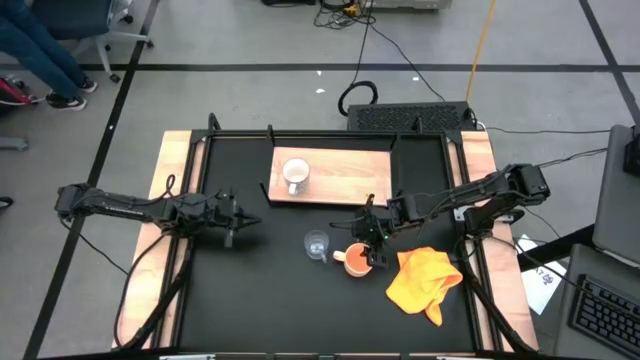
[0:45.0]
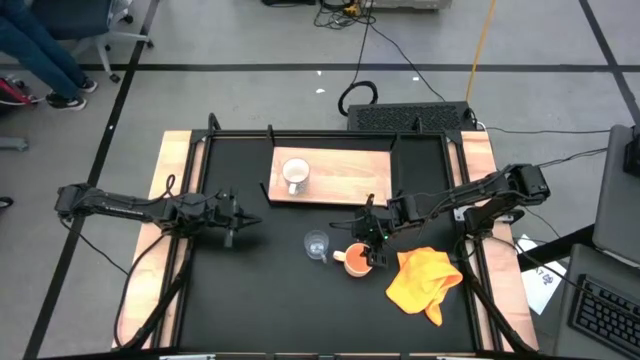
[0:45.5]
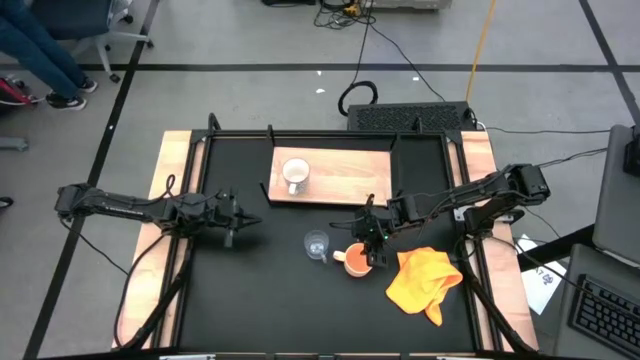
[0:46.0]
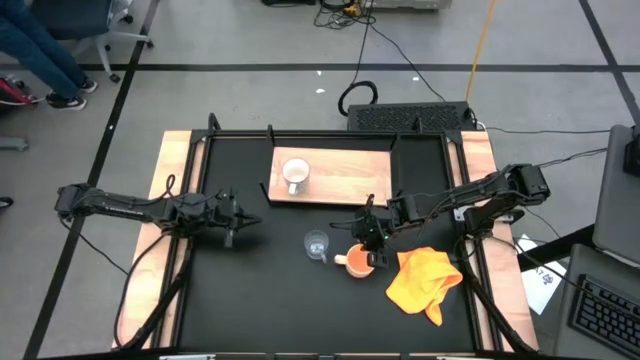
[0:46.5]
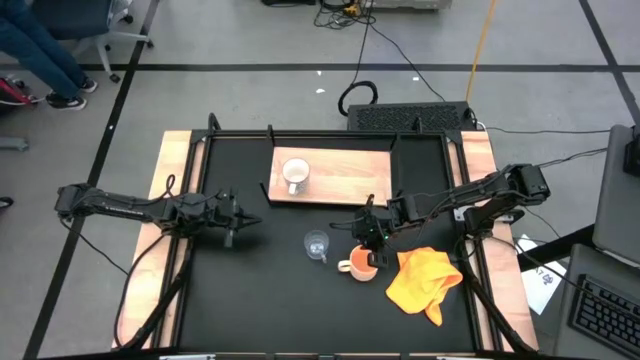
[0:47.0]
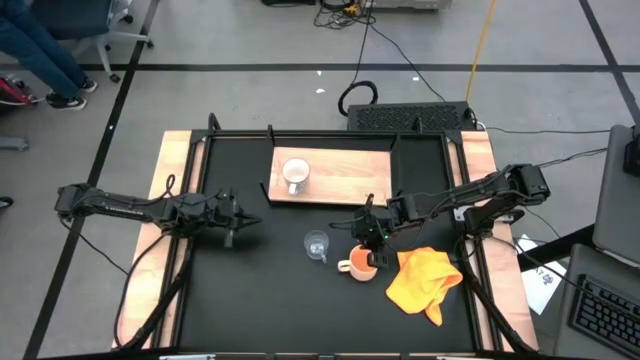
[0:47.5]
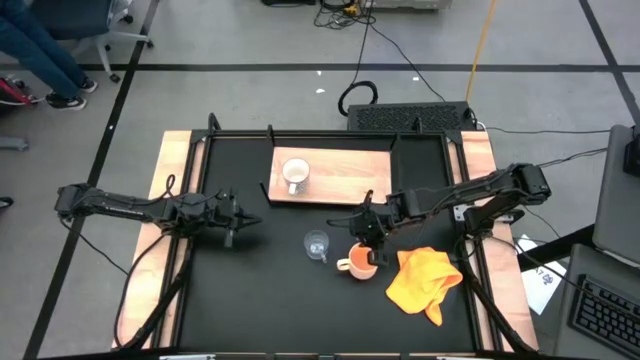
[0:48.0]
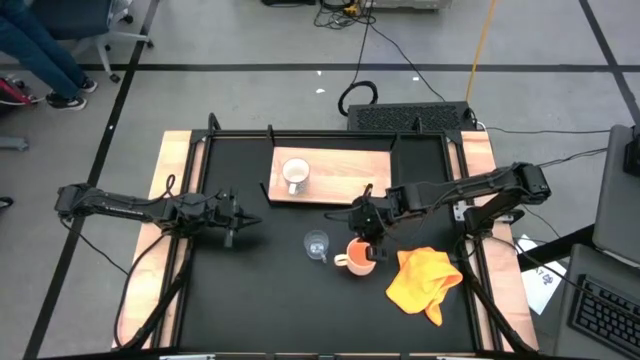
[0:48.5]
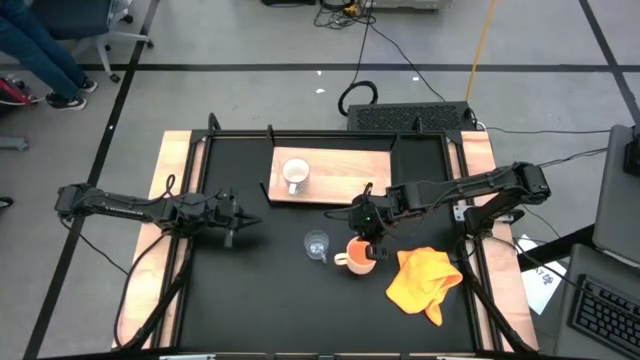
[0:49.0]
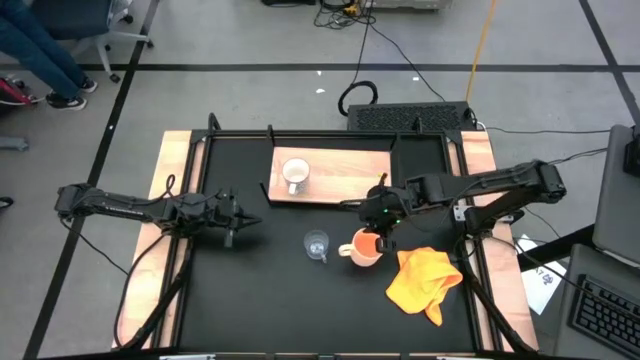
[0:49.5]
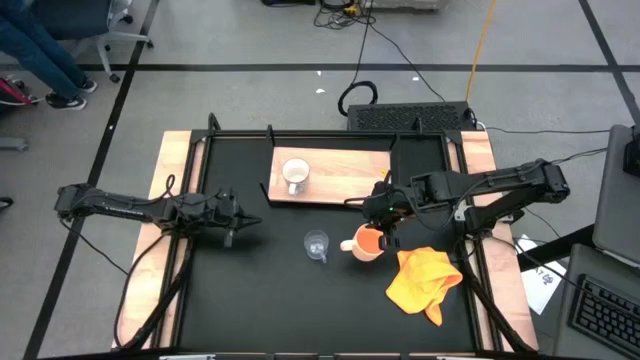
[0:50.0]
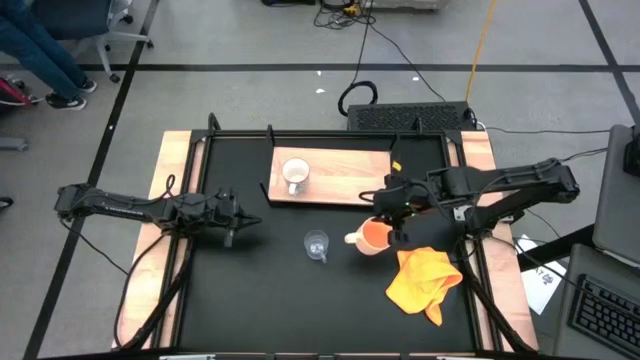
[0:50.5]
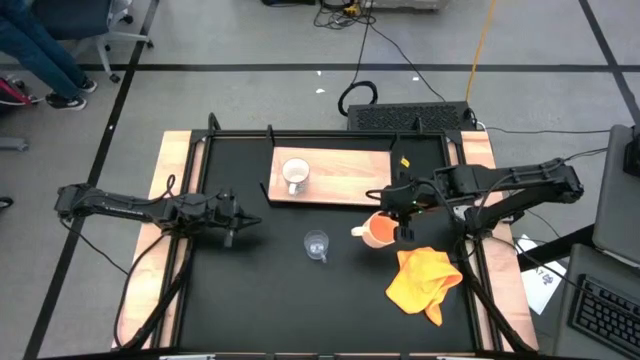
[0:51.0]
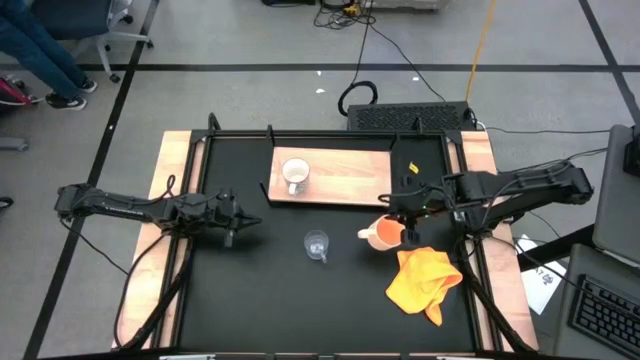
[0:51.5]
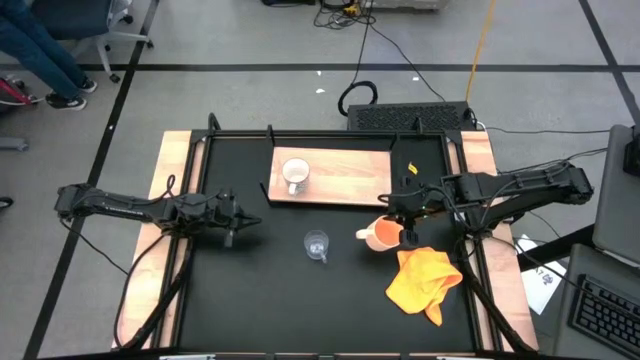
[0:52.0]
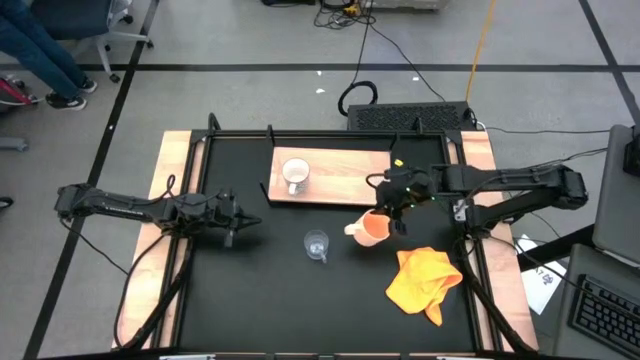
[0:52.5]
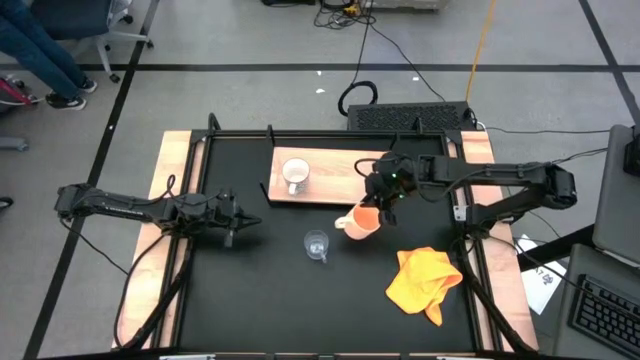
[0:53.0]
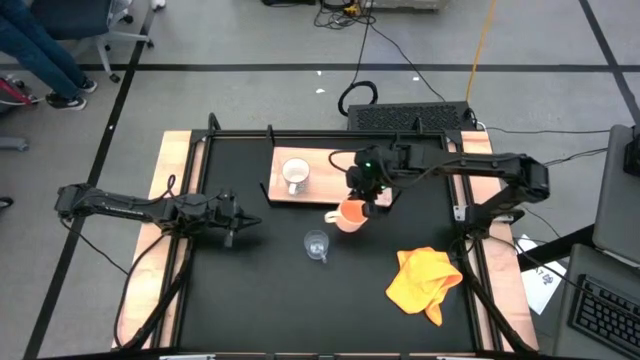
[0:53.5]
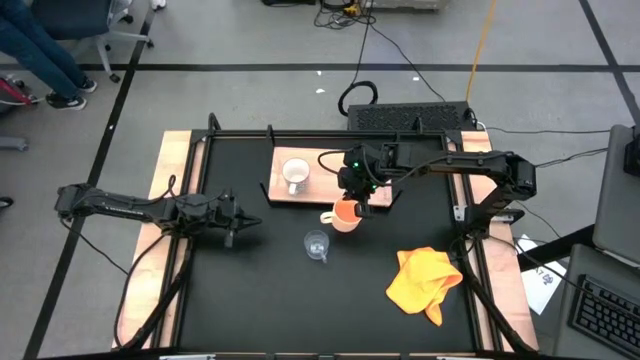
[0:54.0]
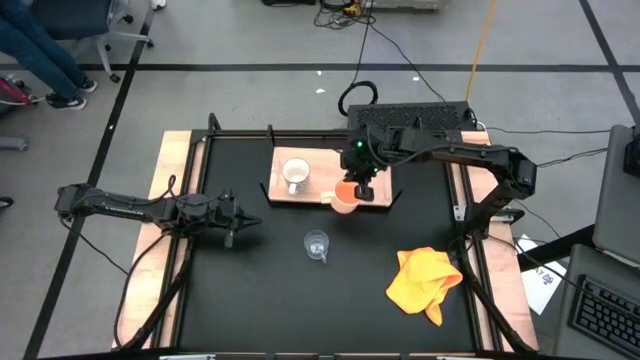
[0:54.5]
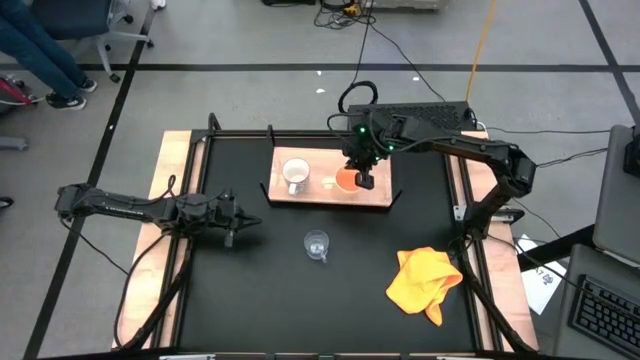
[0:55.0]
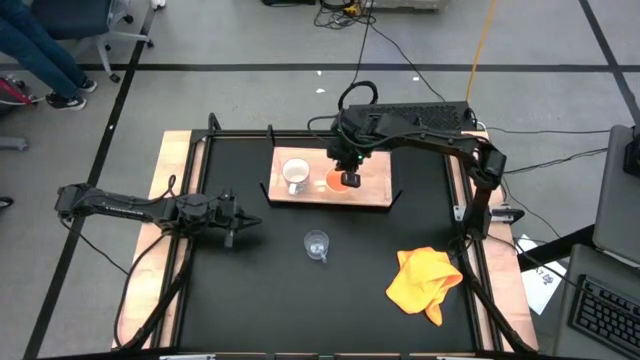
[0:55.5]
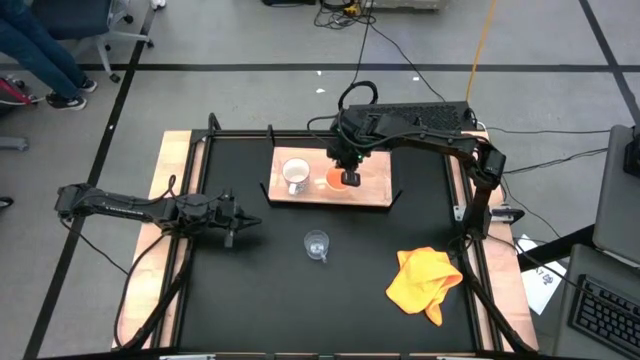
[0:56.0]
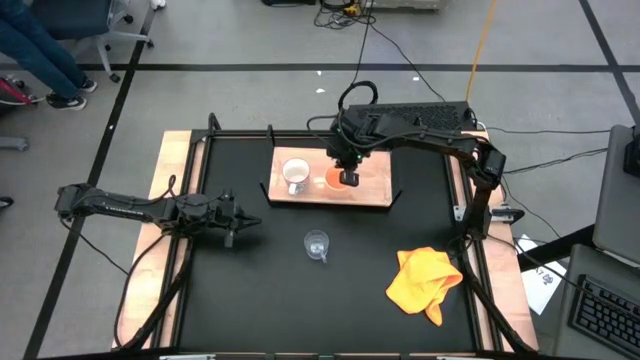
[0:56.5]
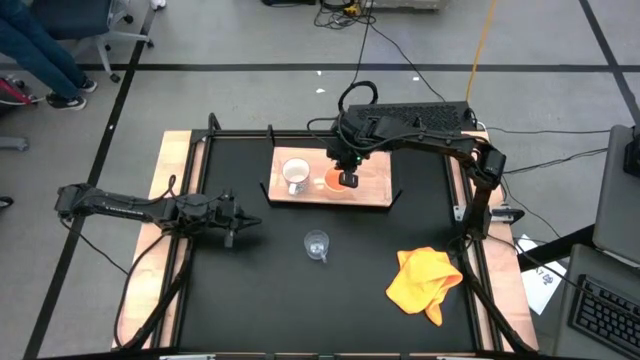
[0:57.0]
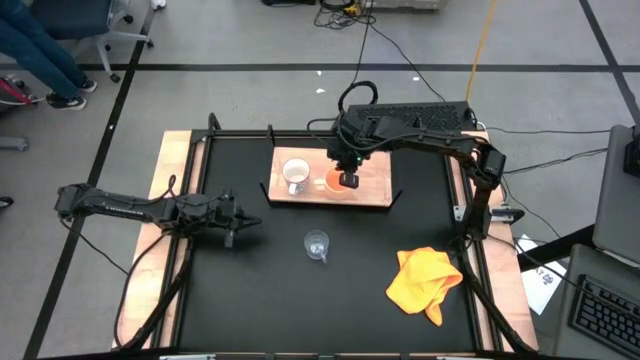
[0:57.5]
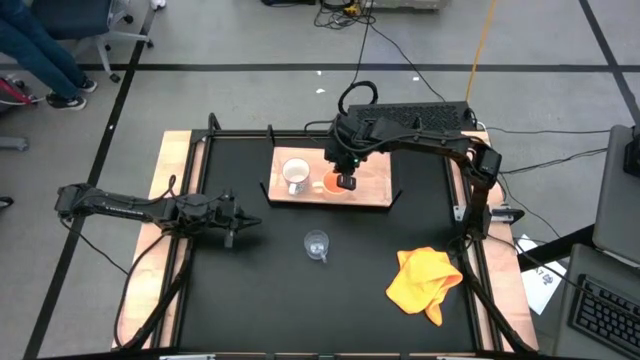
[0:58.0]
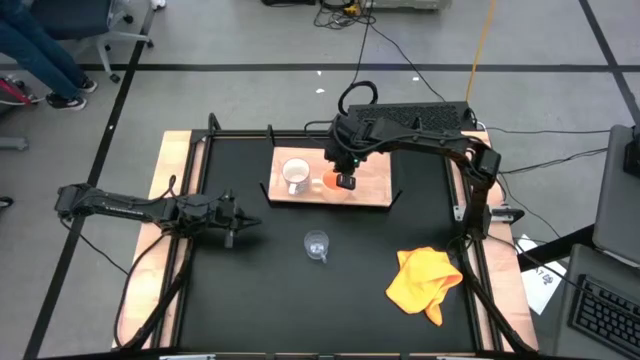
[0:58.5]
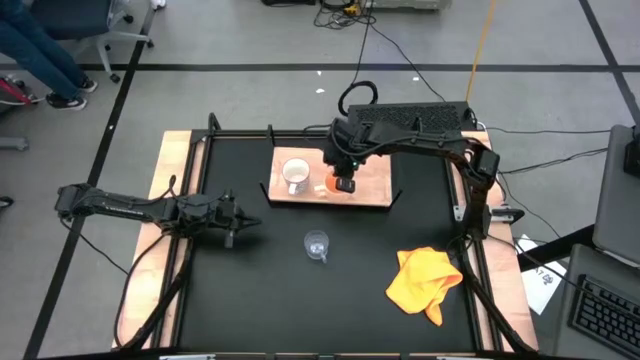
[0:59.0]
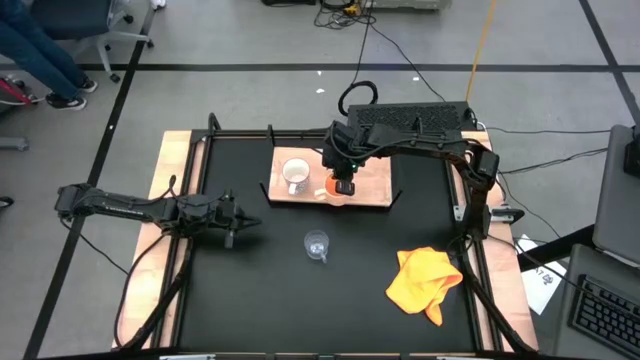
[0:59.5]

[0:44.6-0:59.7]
Task: Stack small to large cups/mugs on shelf
Put the orange mug on the shelf
